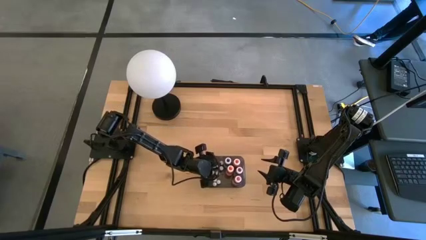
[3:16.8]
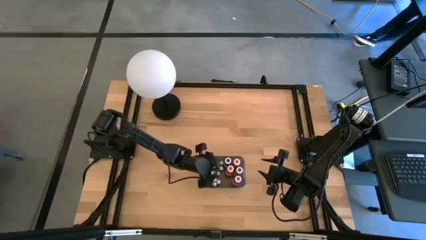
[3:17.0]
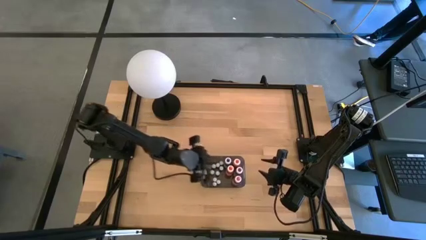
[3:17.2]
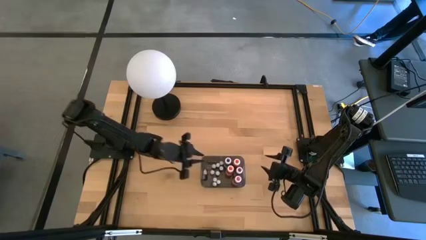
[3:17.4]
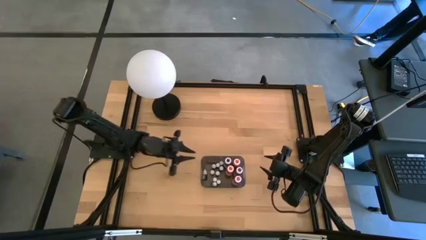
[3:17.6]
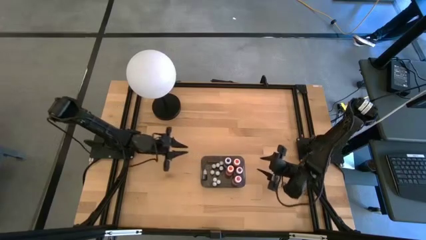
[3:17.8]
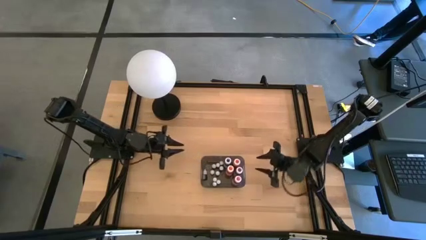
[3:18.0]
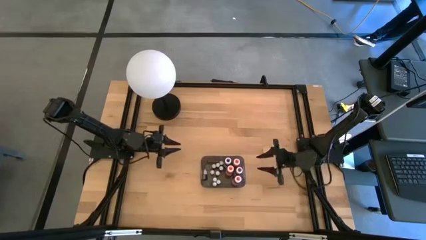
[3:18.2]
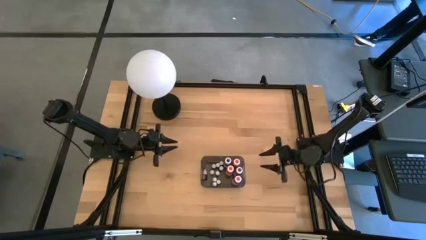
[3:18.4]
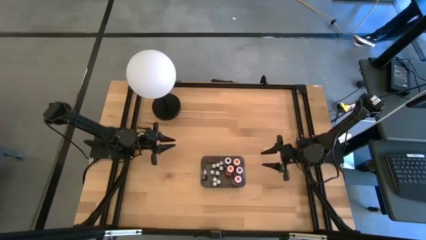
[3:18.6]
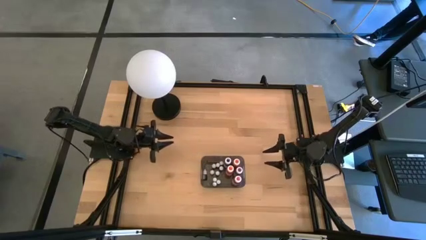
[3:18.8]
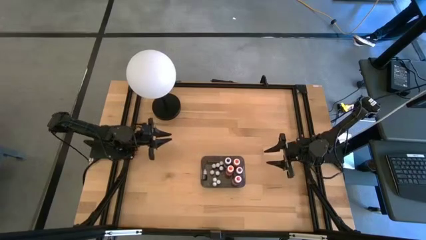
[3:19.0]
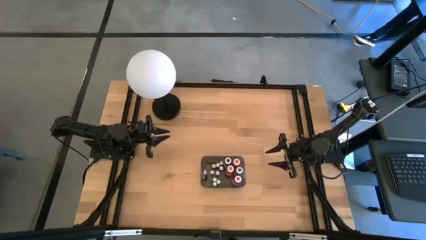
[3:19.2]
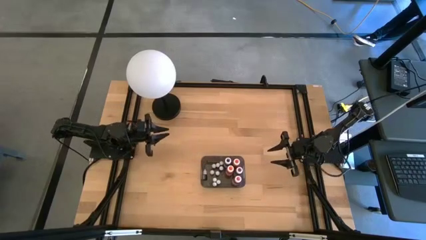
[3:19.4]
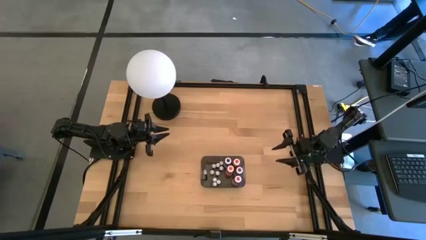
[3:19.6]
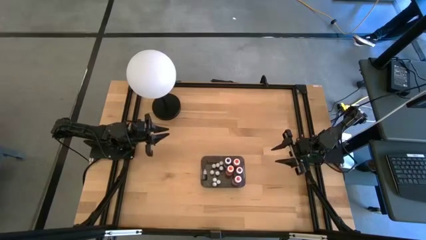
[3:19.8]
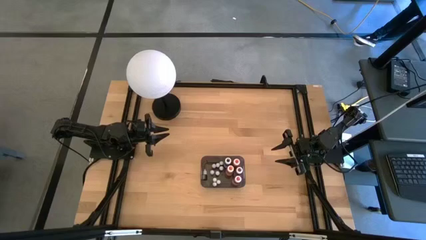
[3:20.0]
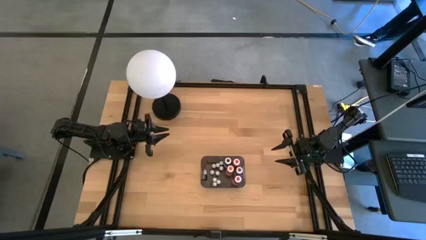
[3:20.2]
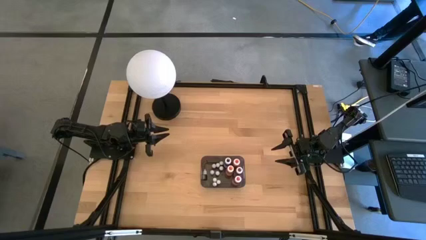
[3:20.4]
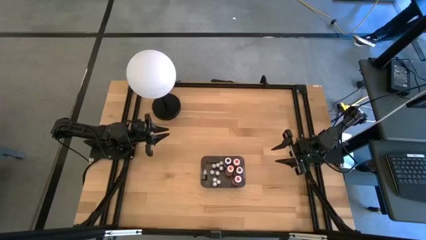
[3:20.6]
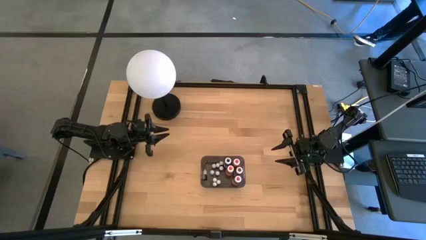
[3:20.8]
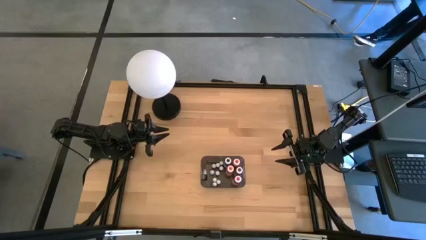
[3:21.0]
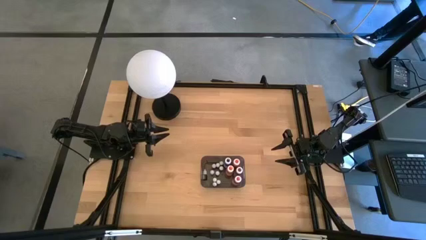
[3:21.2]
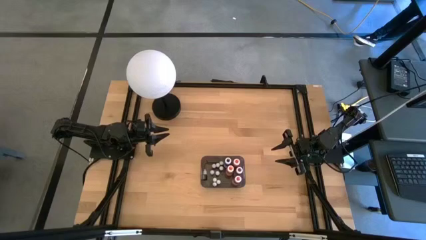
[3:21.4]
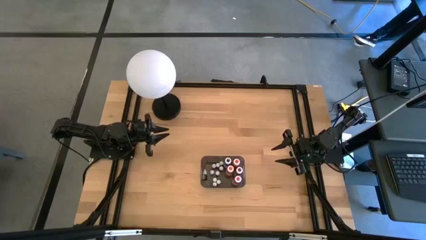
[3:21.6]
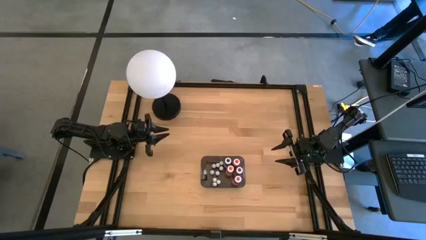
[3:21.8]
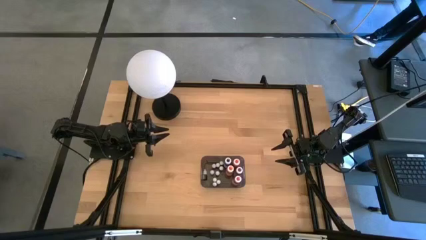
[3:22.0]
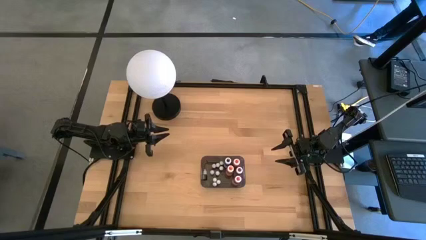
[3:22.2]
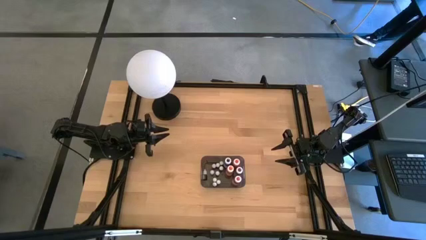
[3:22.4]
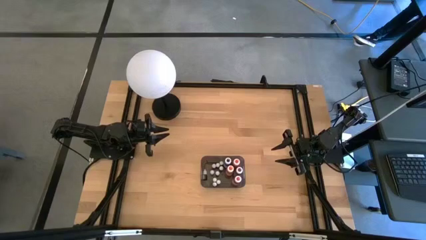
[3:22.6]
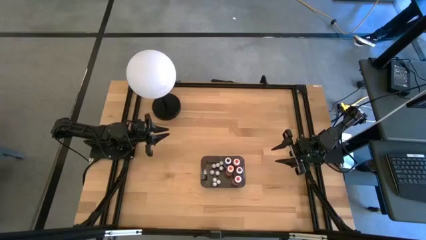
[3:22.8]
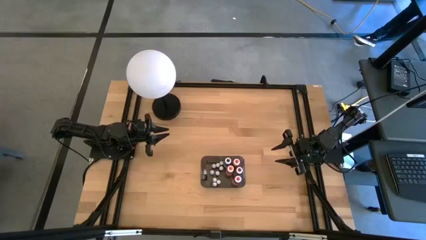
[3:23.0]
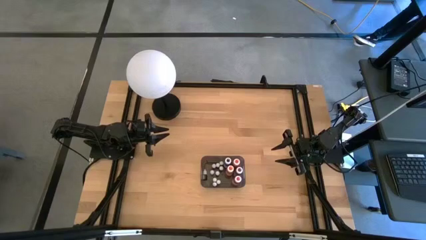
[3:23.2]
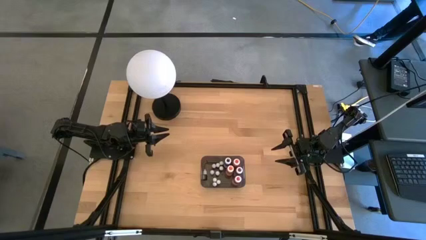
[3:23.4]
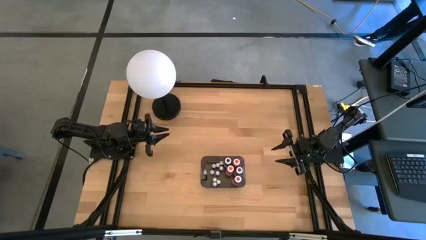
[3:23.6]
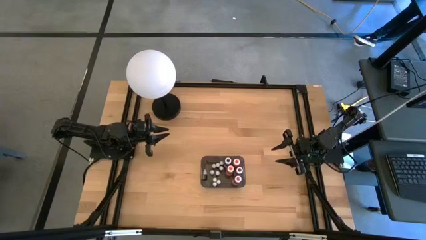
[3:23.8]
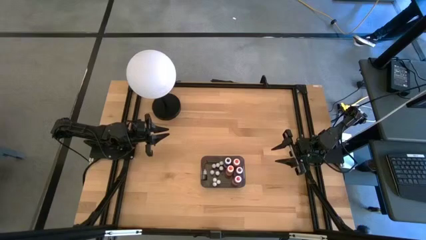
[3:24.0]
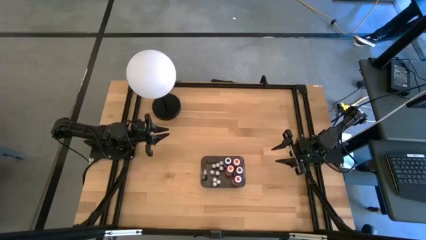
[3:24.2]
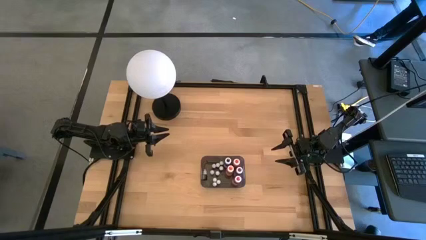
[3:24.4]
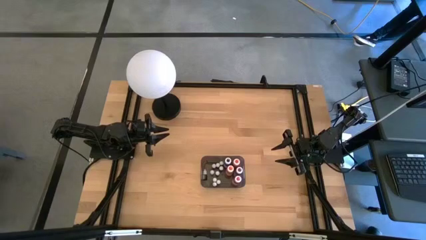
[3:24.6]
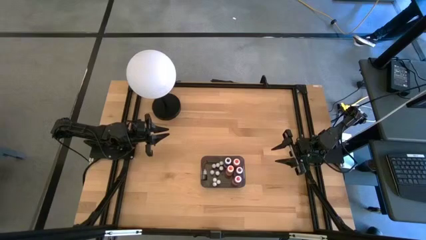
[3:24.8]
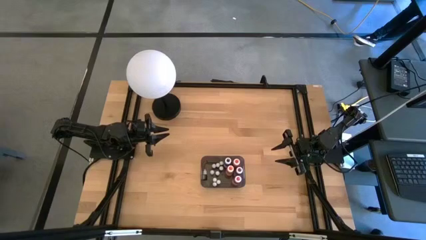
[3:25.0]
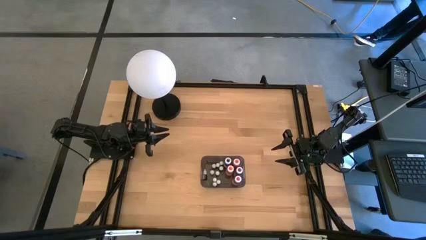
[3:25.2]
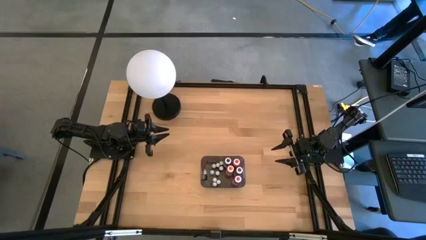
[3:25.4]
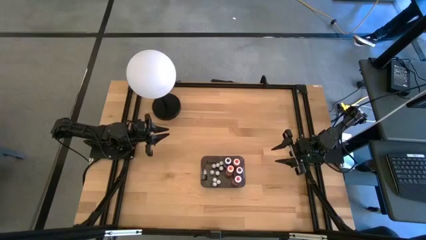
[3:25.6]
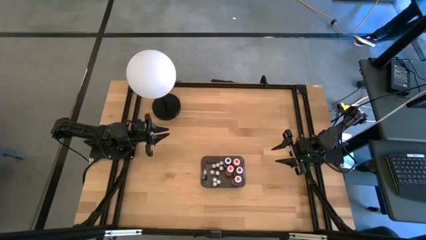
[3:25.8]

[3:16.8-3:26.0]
Task: Pick & Place food coloring
Return to Home Position

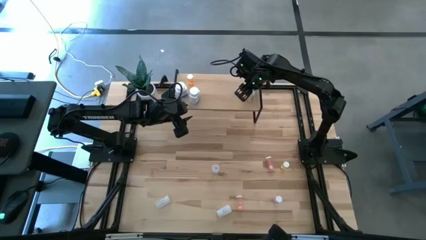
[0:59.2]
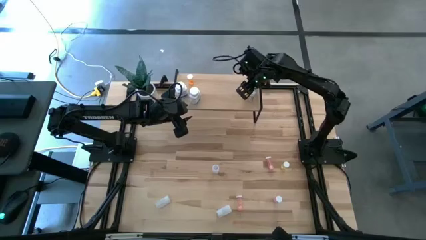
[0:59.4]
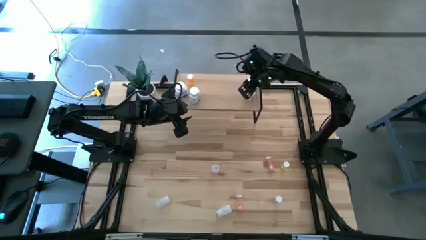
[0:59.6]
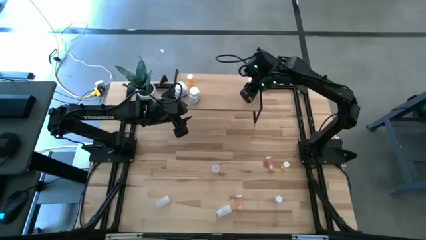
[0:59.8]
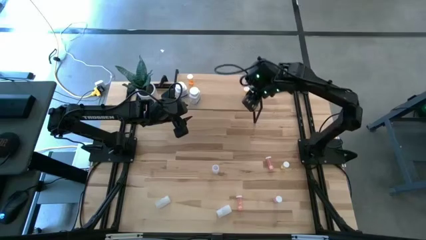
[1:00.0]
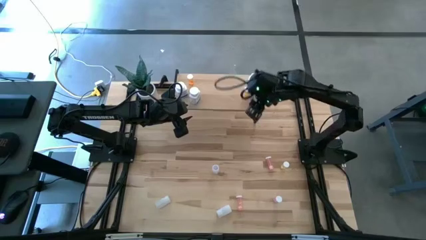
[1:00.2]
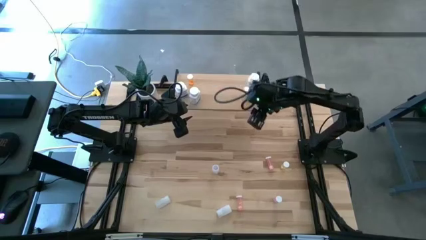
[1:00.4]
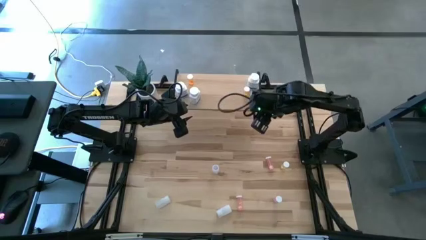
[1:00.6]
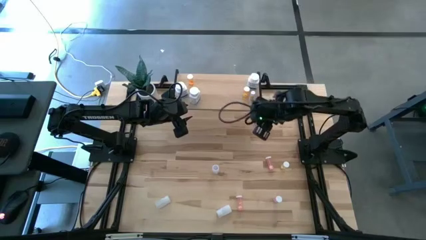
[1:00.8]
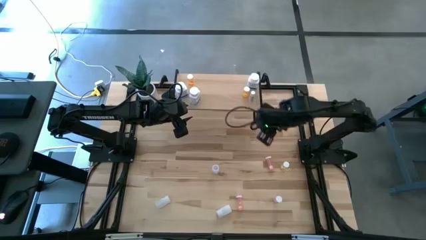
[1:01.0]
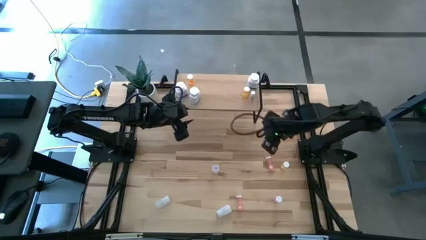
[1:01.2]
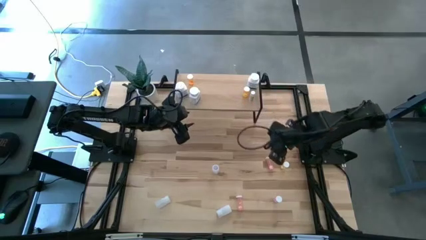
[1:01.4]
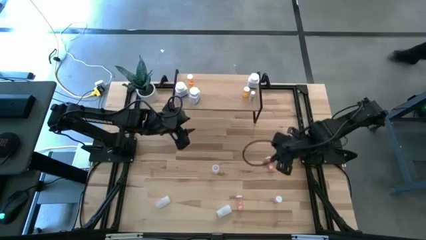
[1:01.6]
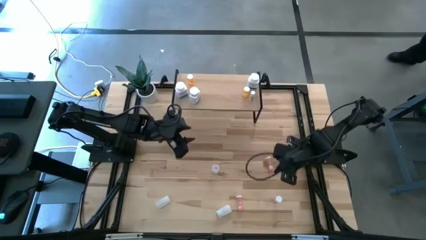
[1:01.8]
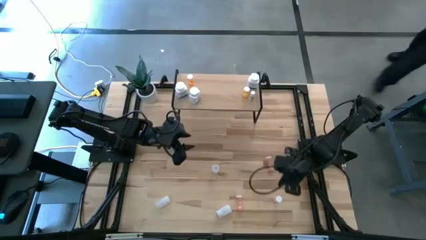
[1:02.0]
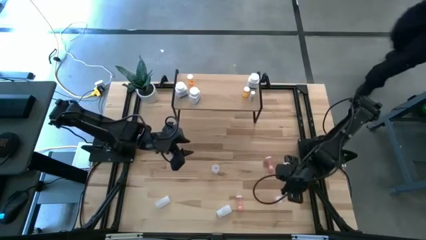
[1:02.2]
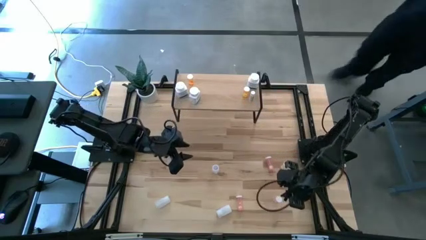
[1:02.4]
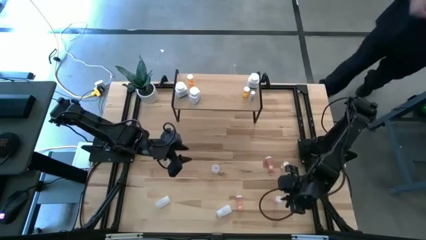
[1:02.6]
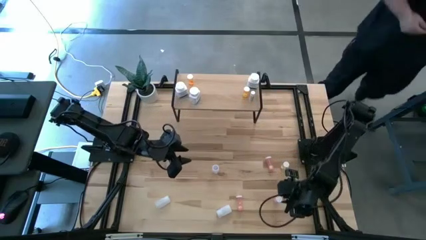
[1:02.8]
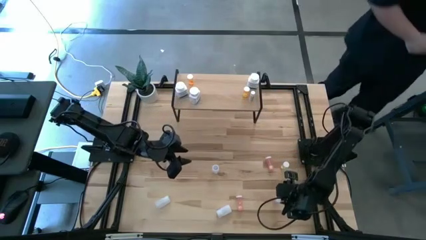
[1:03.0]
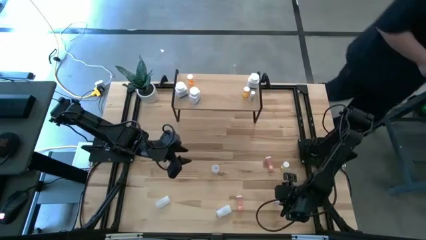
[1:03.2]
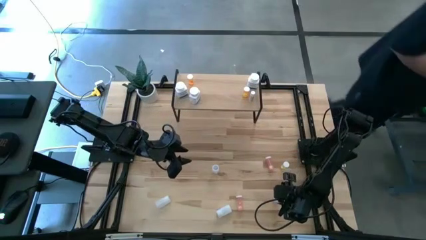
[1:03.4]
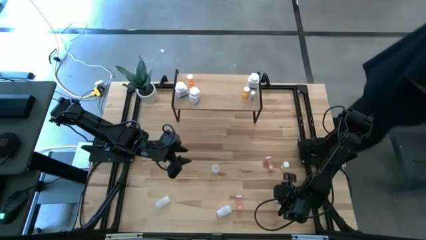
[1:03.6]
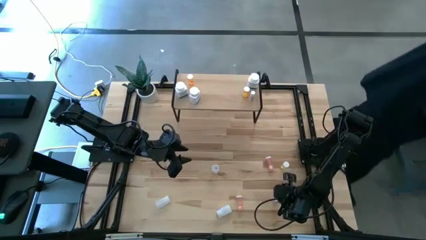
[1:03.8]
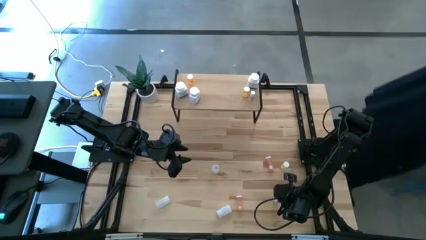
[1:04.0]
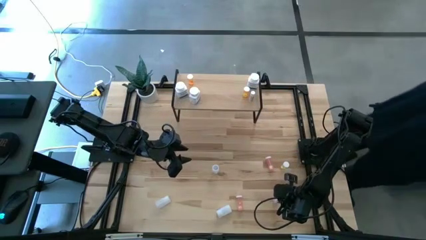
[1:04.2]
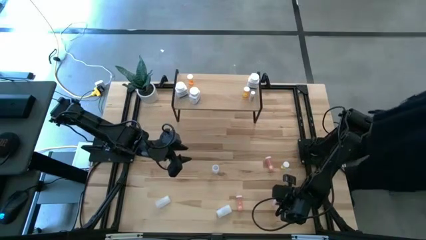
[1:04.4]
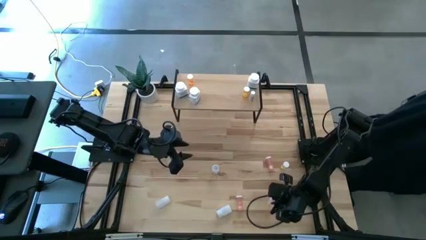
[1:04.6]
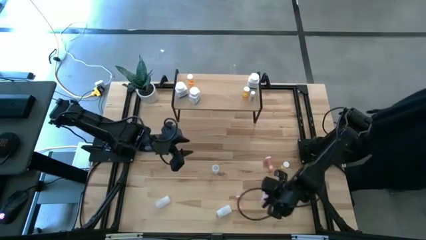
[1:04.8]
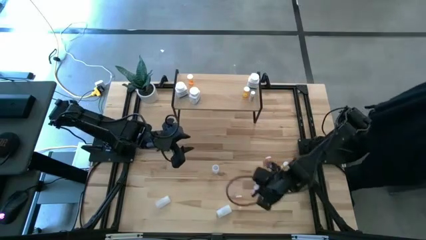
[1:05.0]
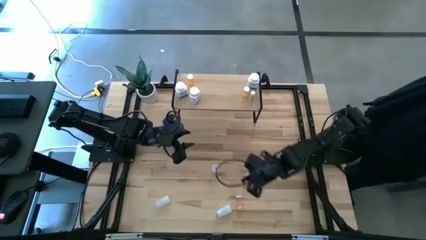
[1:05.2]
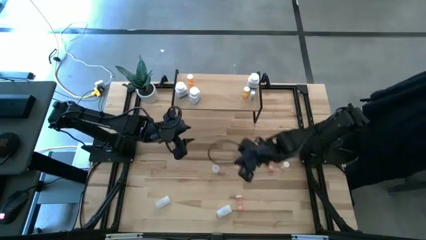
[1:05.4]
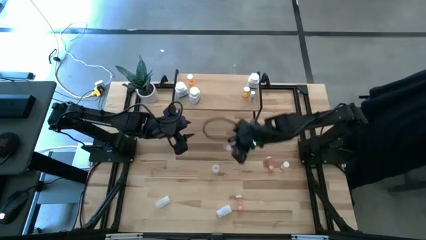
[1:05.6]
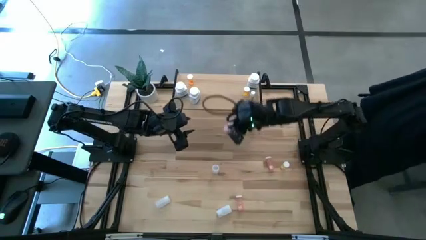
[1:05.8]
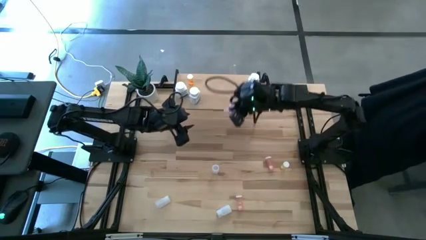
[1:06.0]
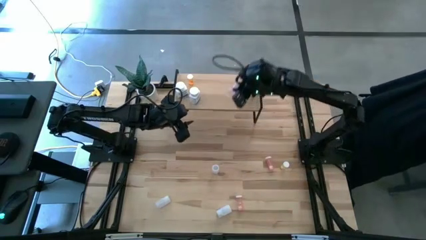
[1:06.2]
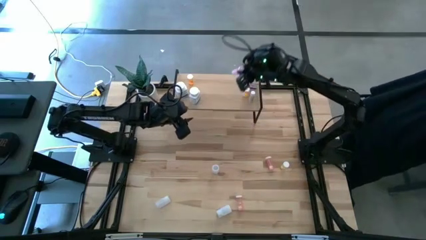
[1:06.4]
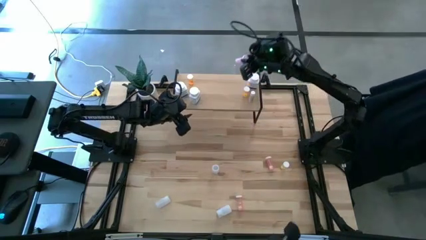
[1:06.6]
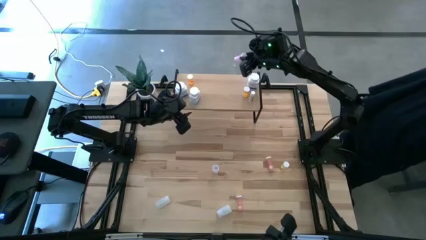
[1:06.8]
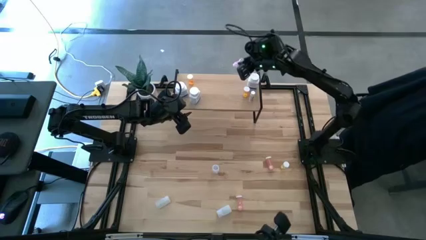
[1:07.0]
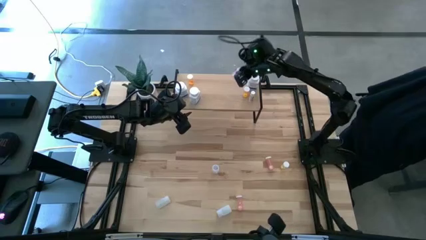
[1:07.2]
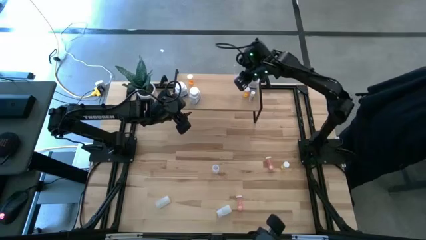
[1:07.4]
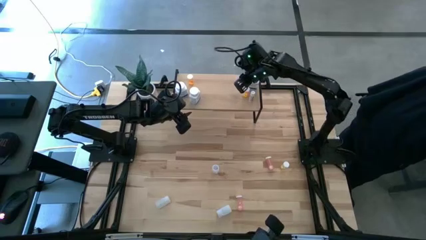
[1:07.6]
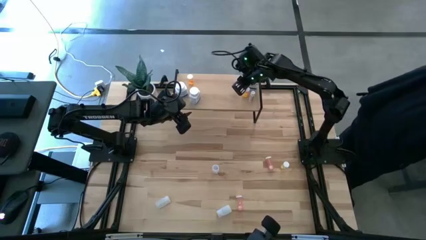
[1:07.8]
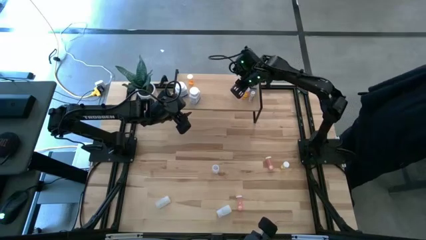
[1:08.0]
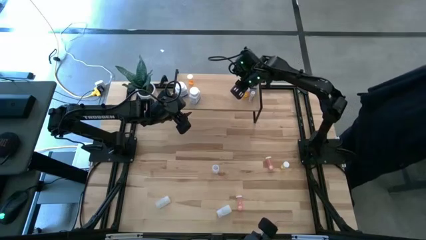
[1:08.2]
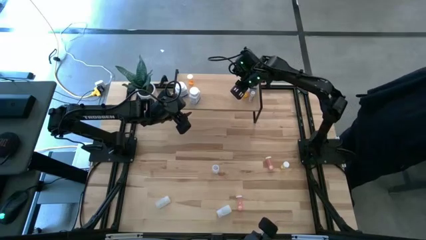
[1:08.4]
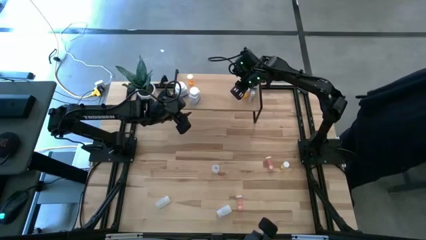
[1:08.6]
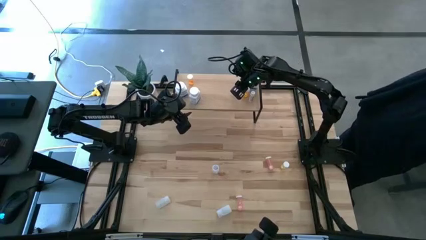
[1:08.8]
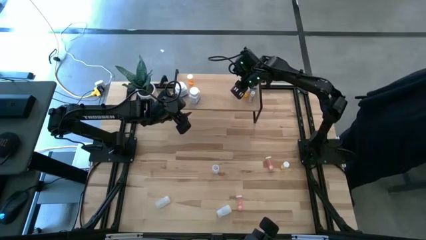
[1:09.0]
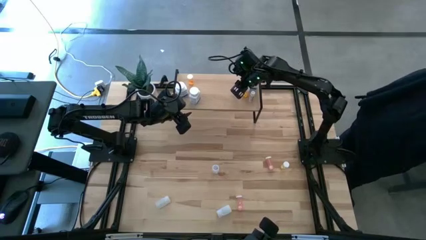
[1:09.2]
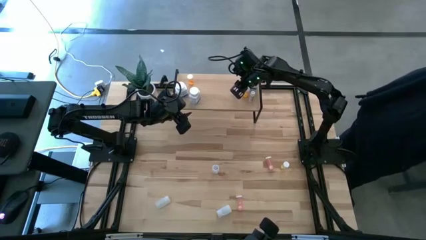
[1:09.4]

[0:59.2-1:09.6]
Task: Pick and place medicine bottles onto shelf by color
Put the right pink pill bottle on the shelf
